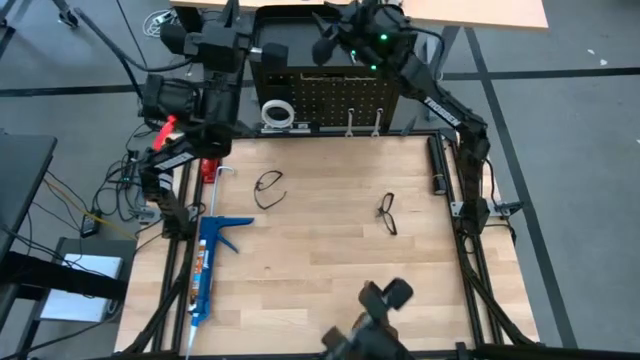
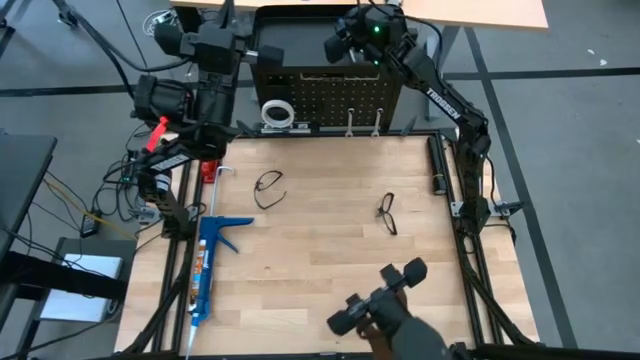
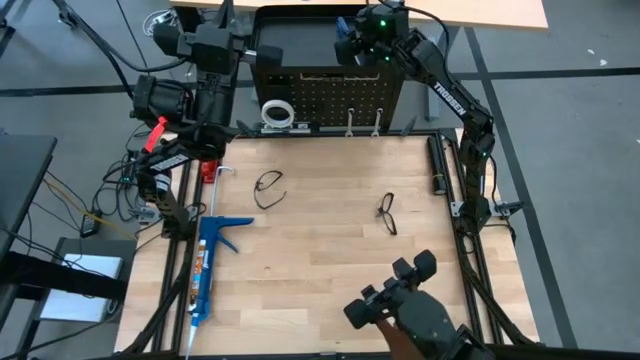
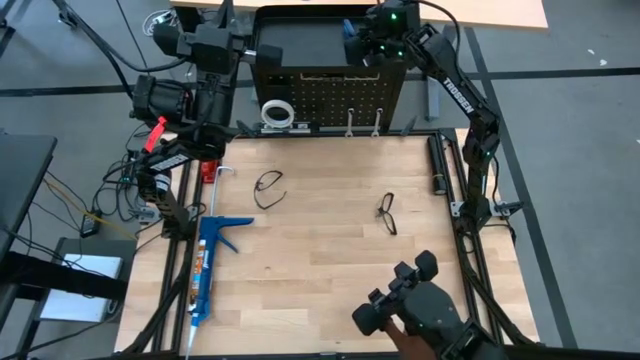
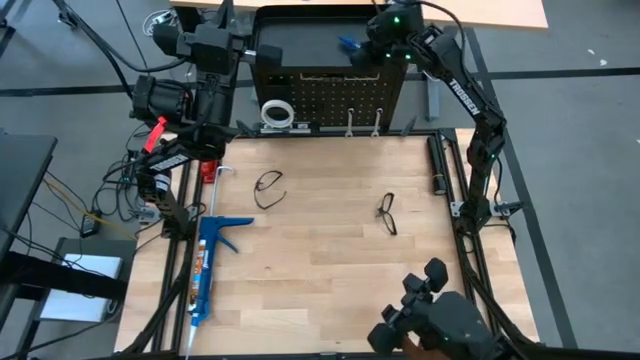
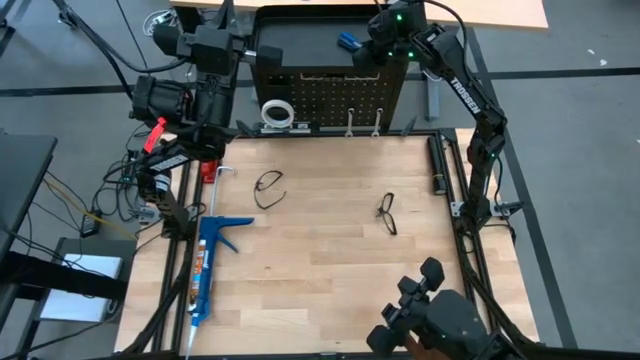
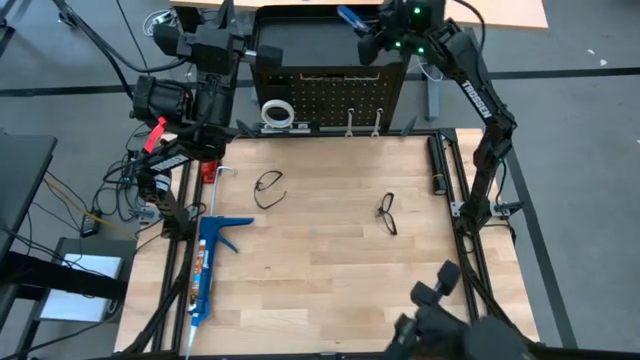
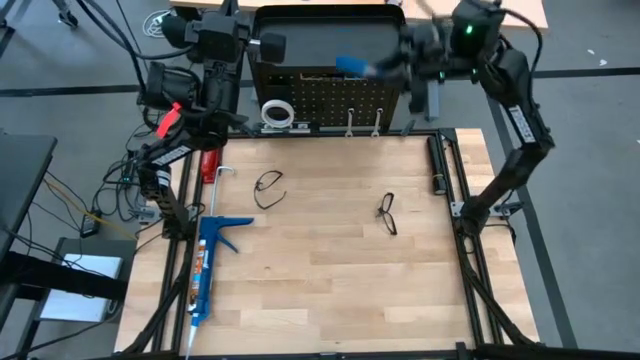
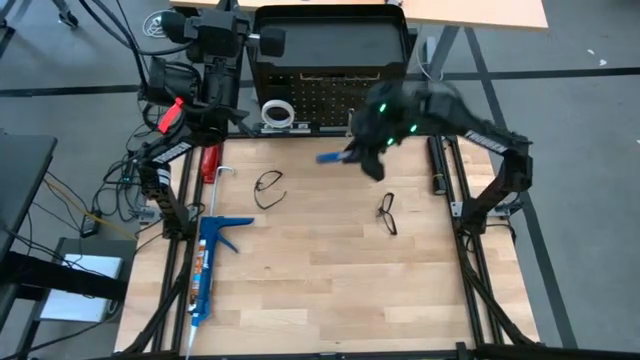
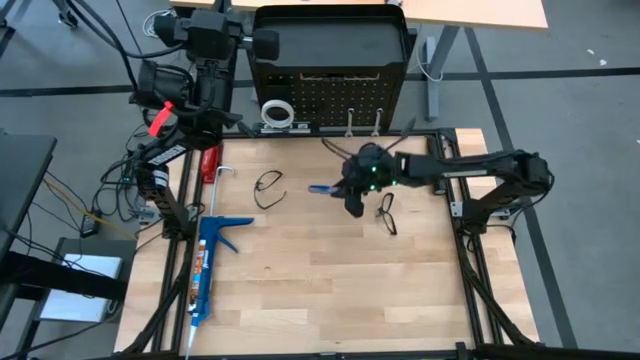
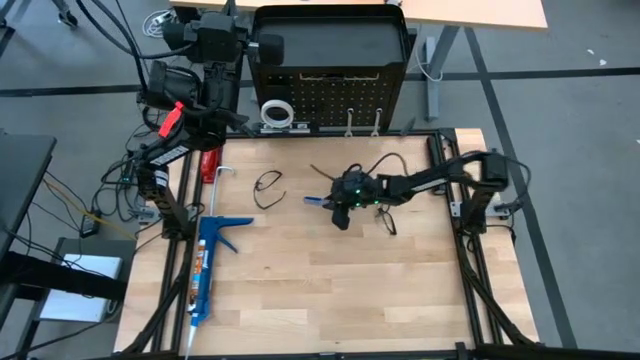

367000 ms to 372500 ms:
Task: Hang tools onto peg board
Remove the blue screwdriver from the black pegboard

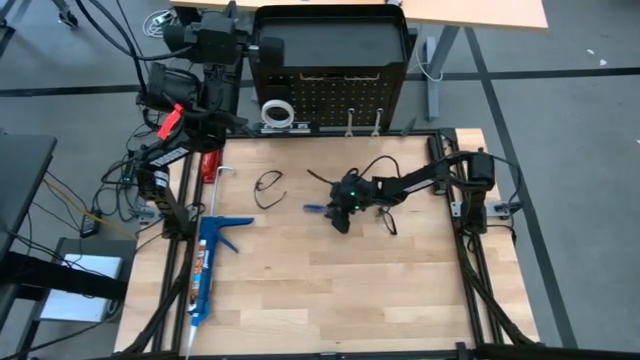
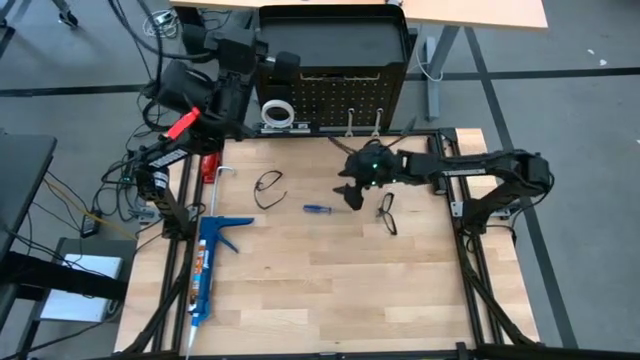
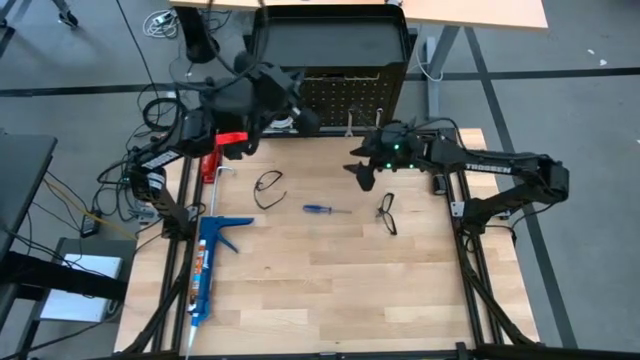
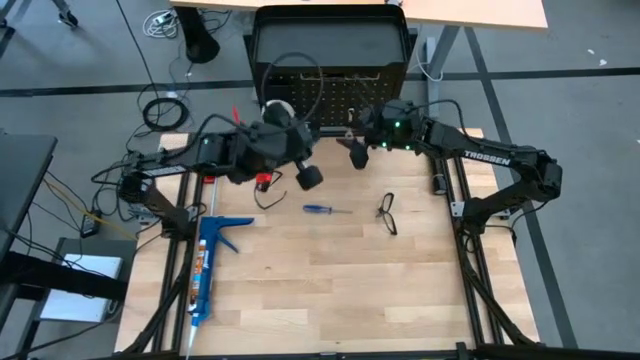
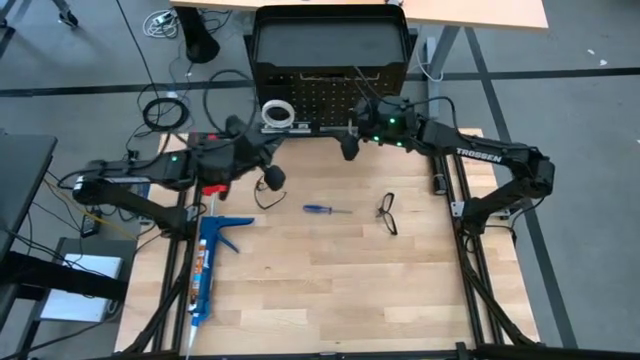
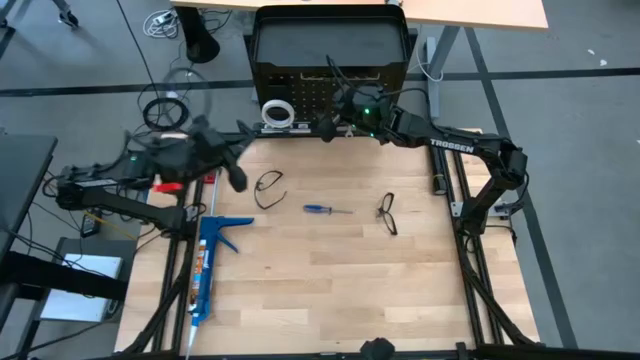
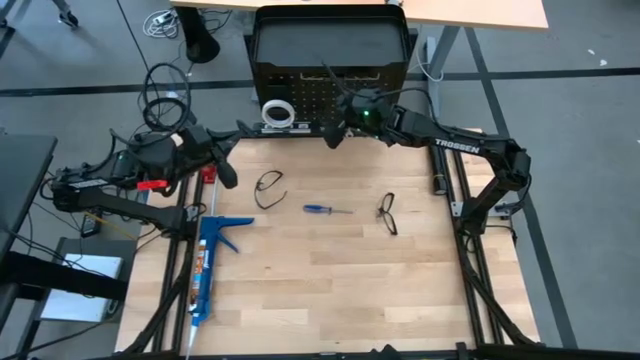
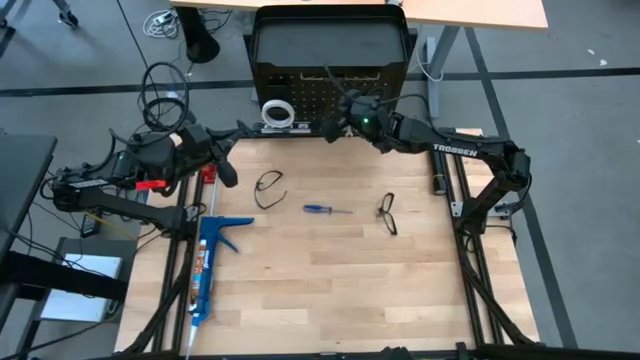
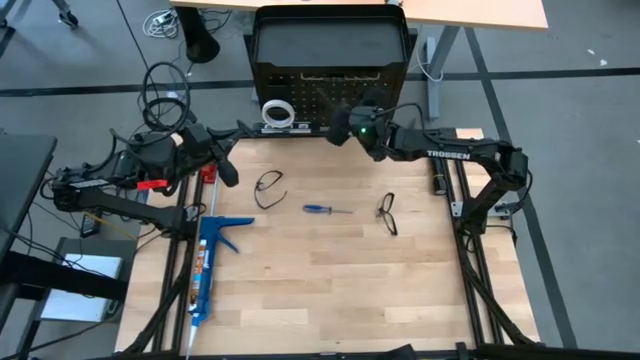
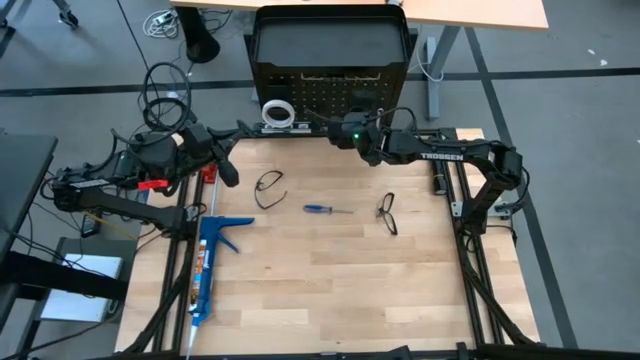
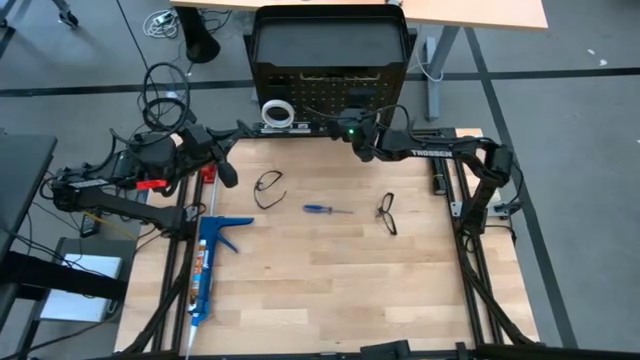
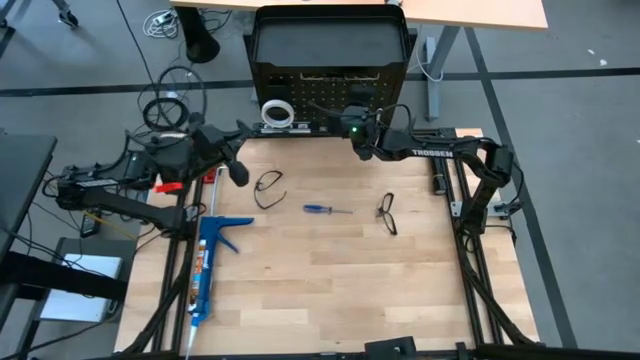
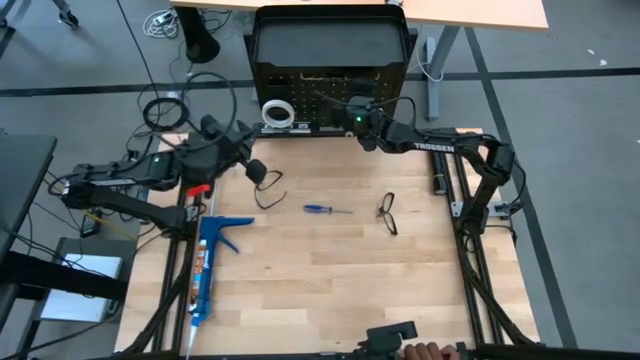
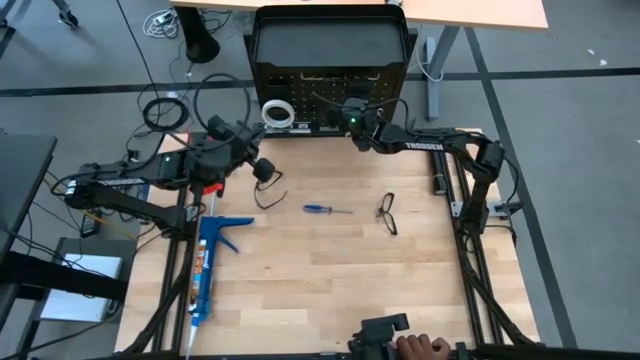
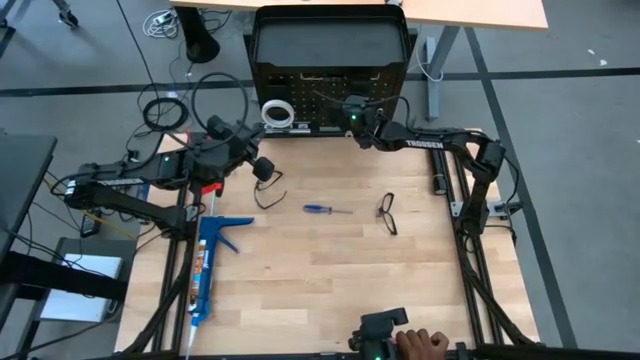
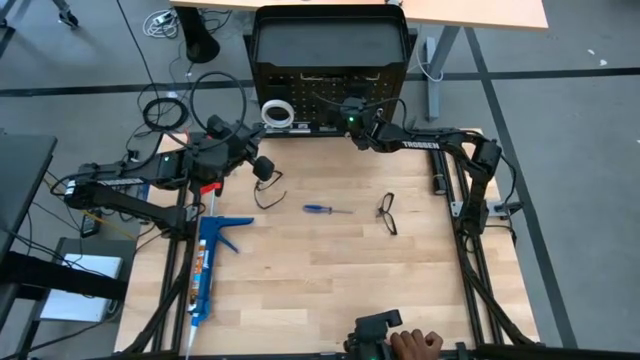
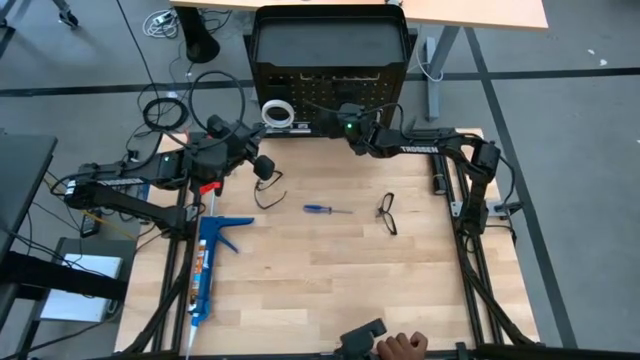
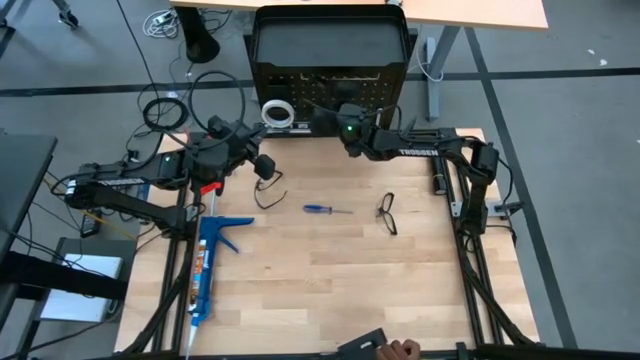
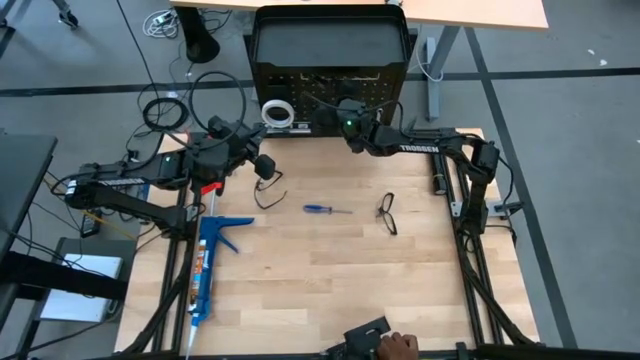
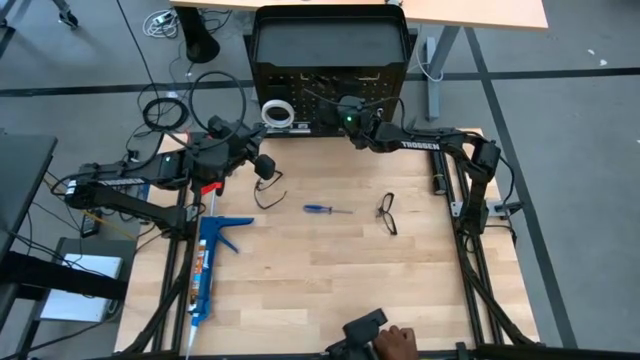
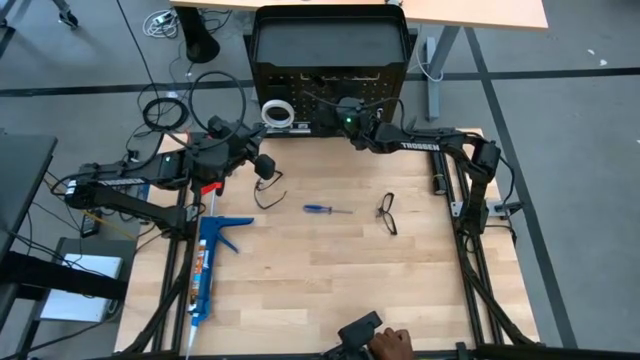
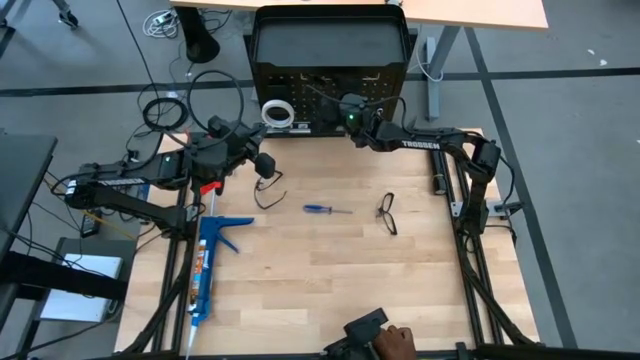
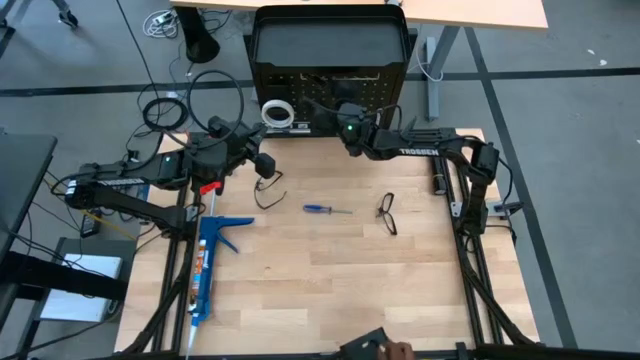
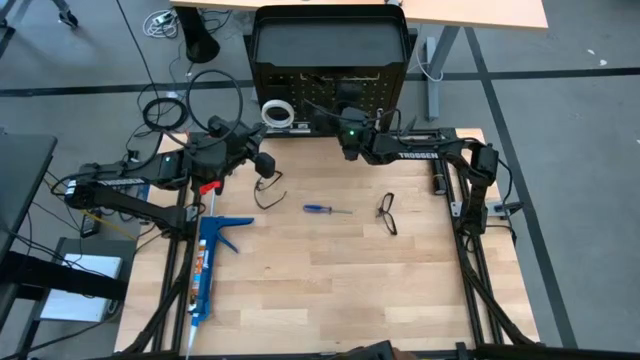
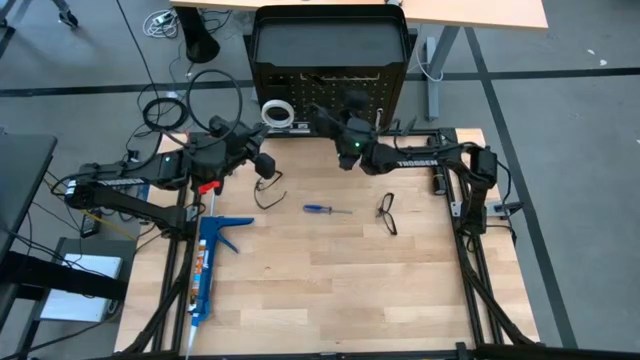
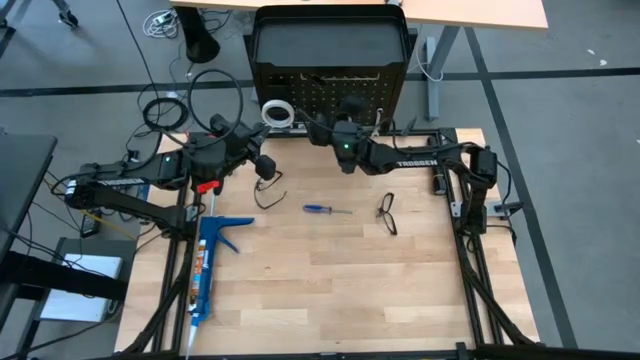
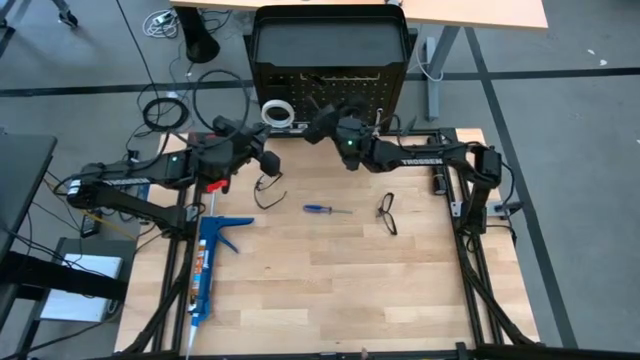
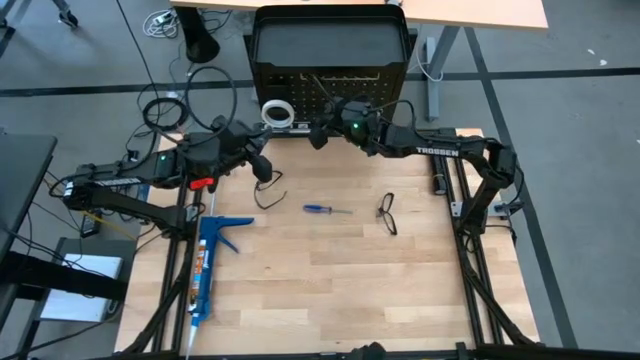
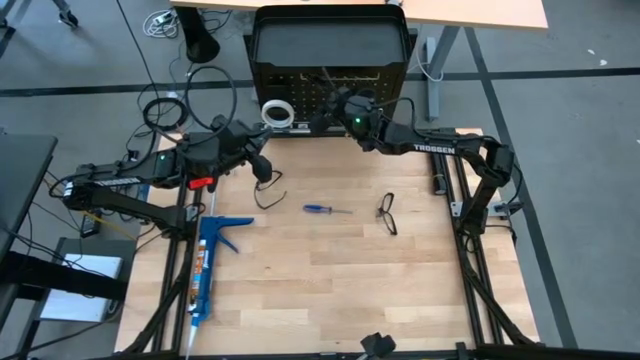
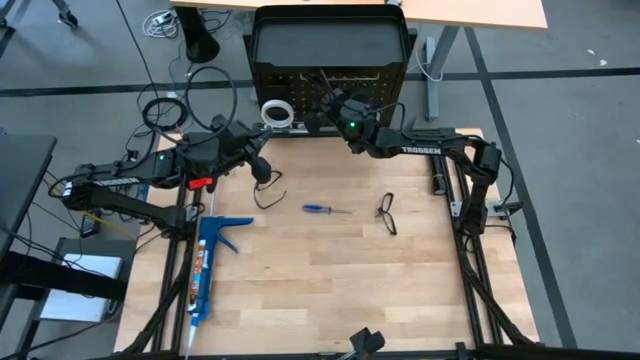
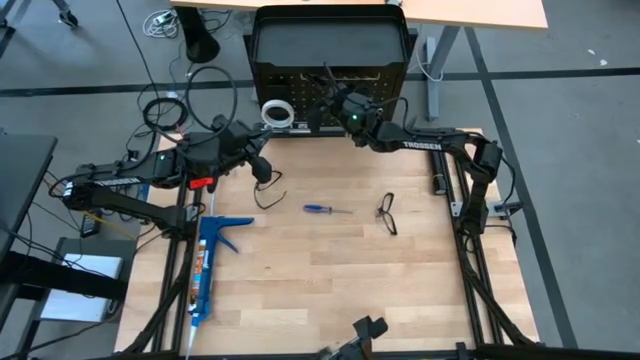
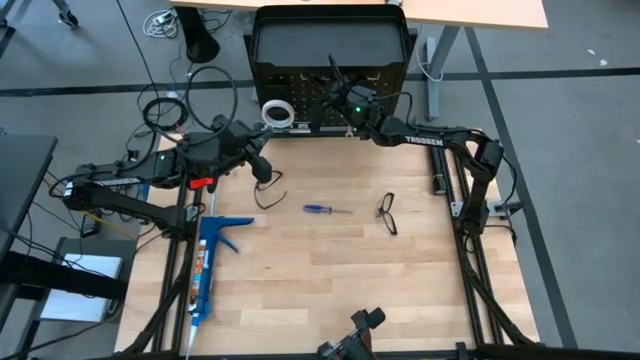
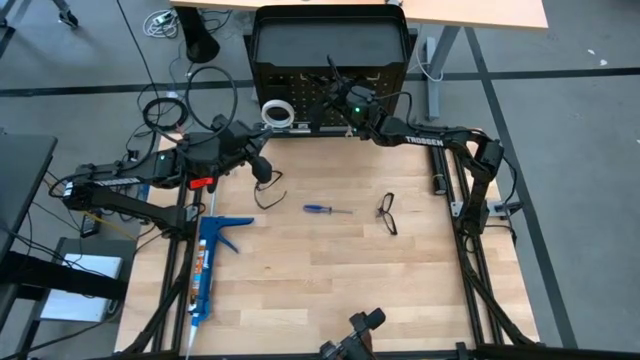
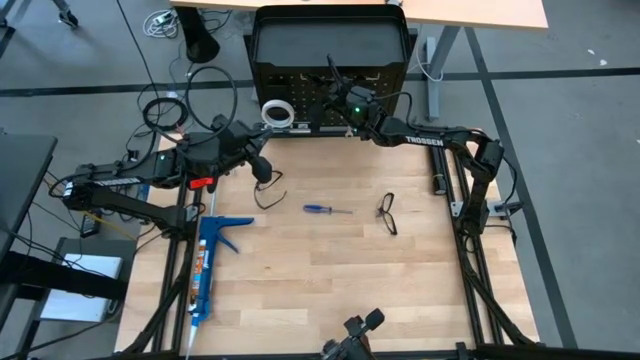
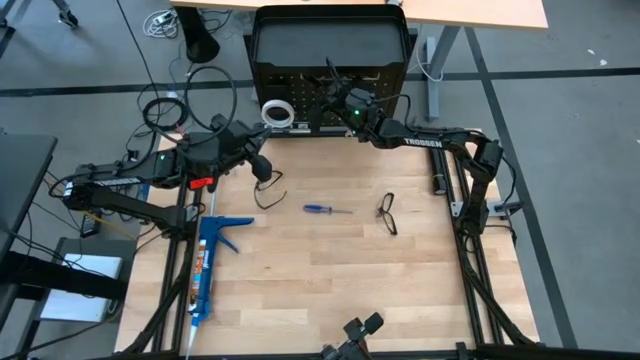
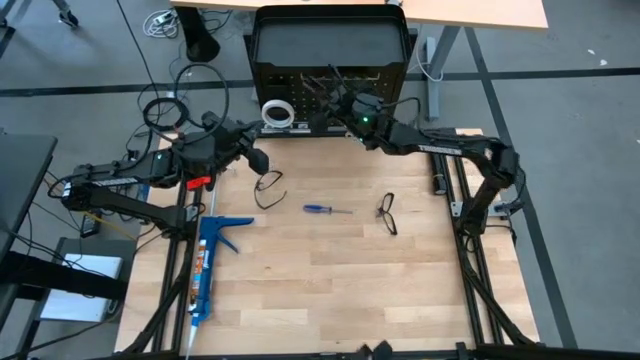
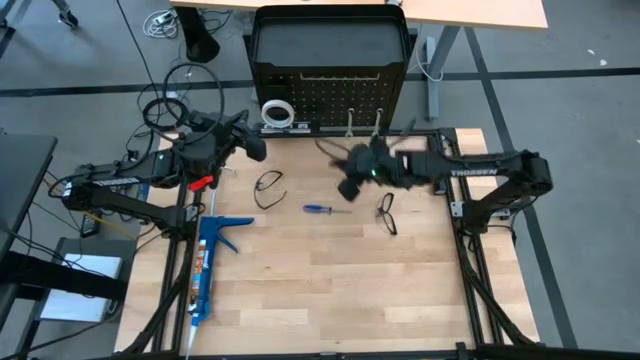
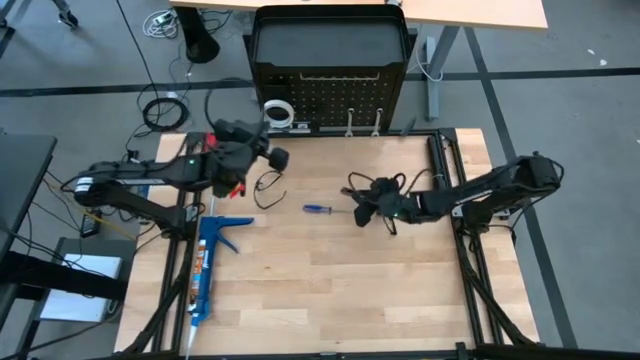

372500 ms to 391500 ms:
Remove the black black utility knife blade dispenser from the black pegboard
